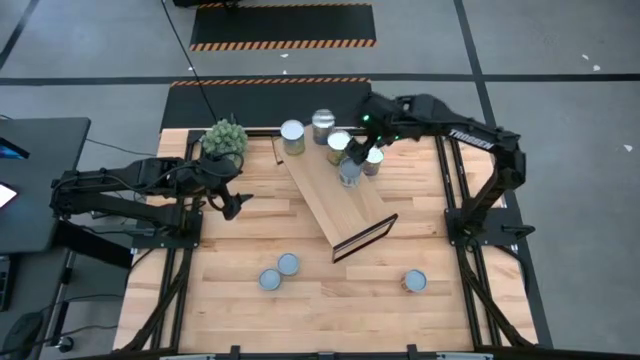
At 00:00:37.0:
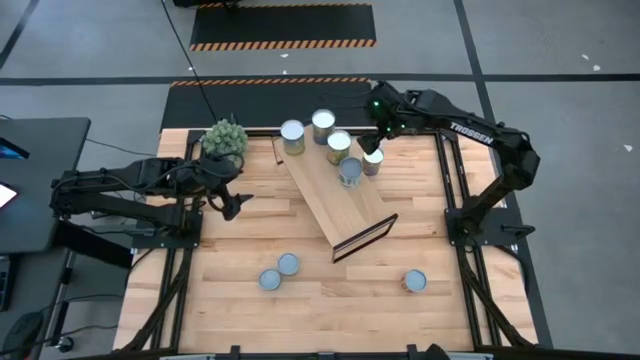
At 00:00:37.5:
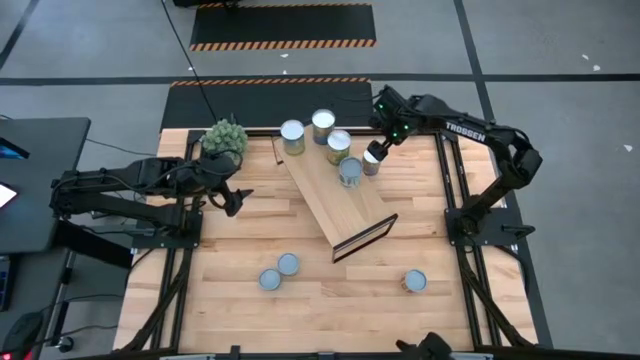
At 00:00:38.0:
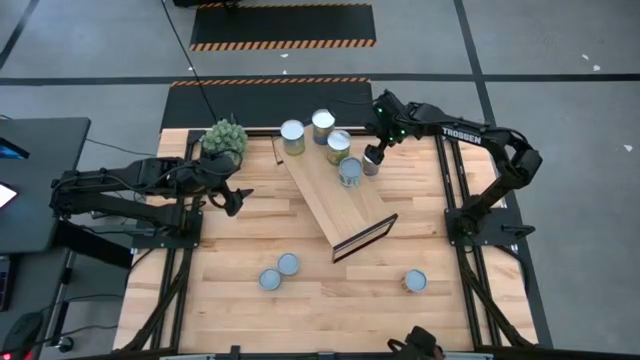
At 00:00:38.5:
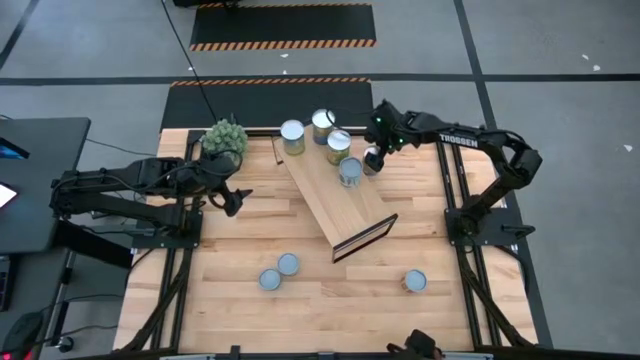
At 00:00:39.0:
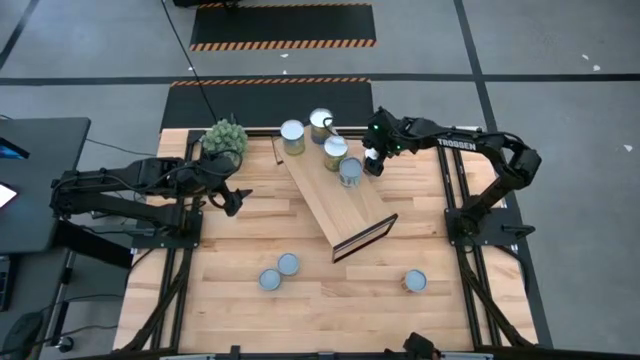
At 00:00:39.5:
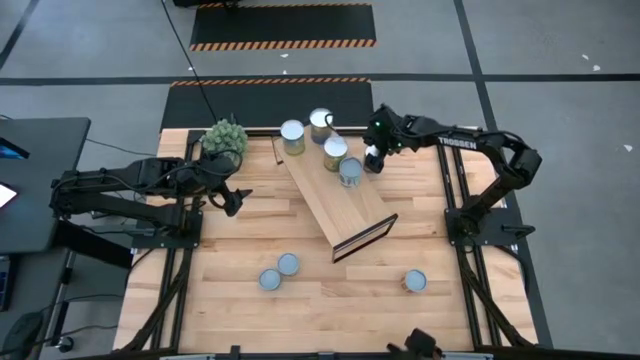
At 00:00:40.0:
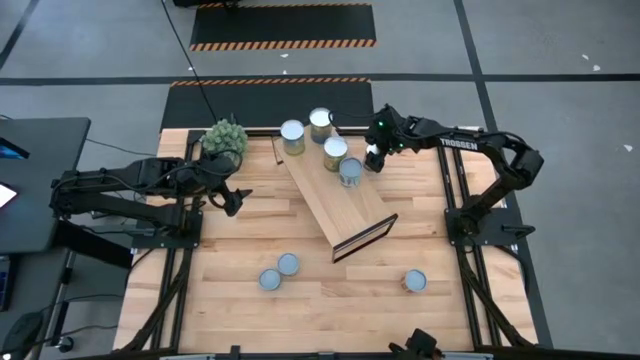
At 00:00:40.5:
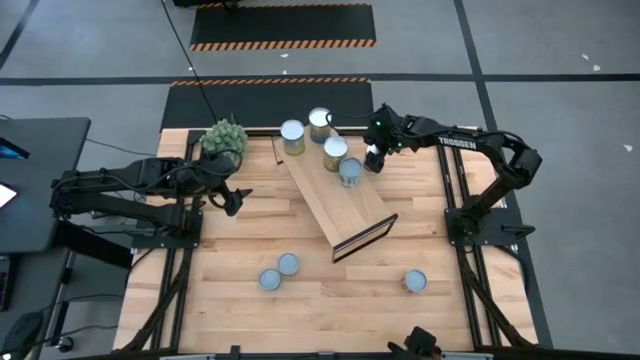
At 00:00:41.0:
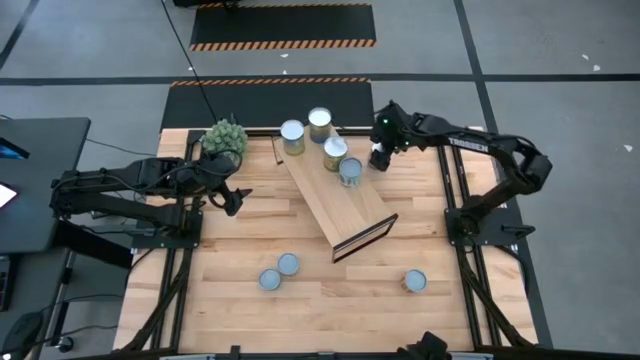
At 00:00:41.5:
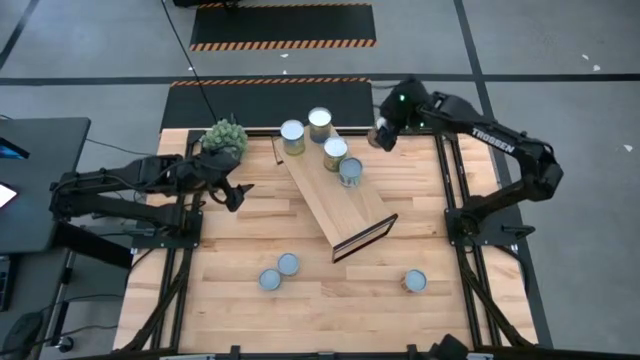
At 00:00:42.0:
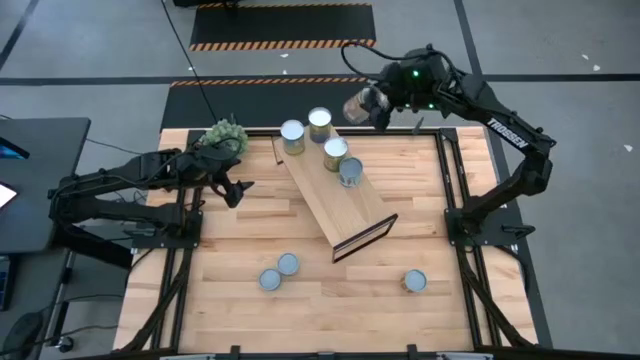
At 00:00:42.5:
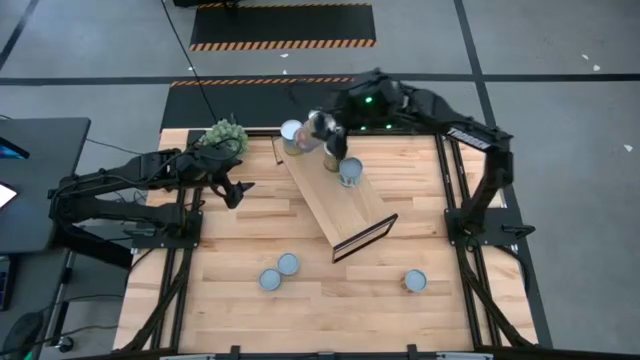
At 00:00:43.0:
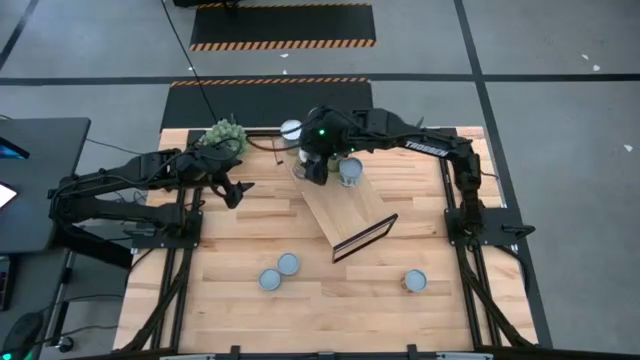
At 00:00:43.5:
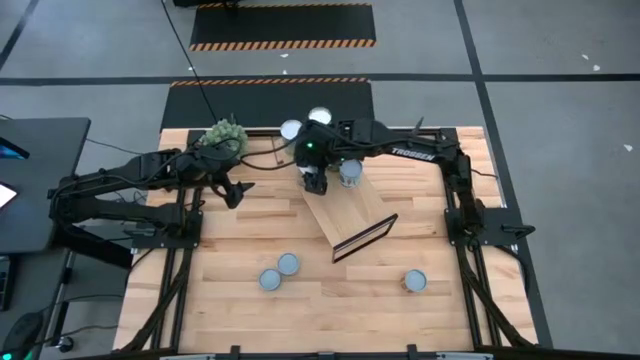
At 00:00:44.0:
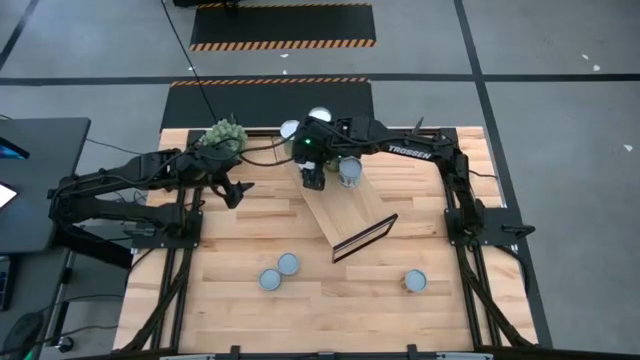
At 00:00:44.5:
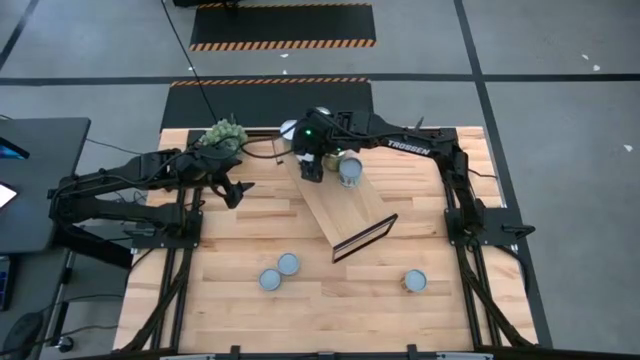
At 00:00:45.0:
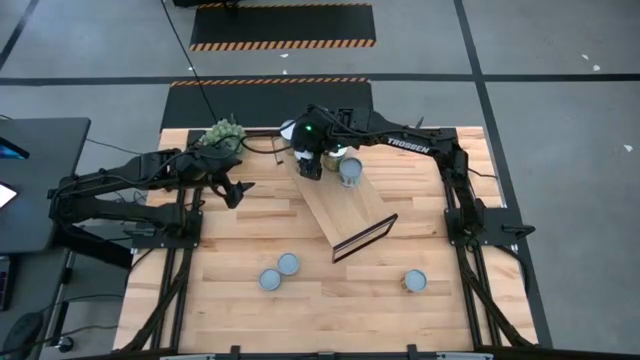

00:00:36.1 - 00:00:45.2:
Task: Pick and place cans onto a shelf
Put the canned peaches on the shelf

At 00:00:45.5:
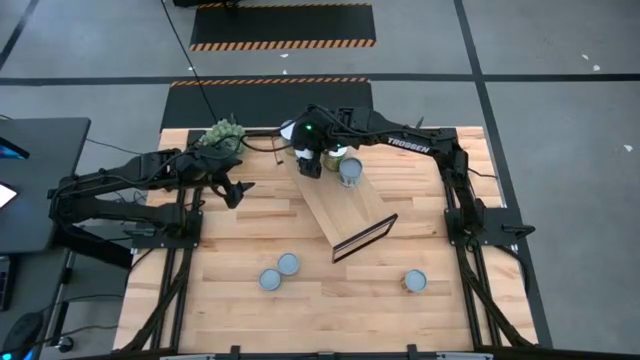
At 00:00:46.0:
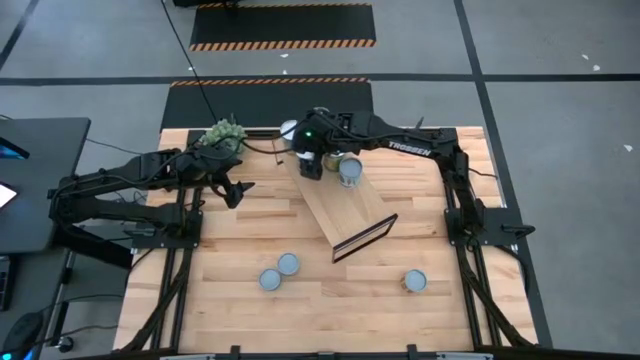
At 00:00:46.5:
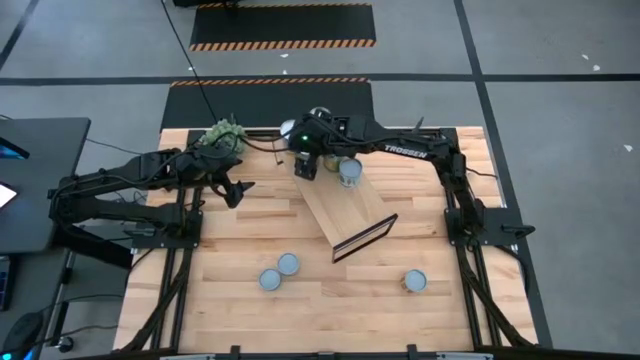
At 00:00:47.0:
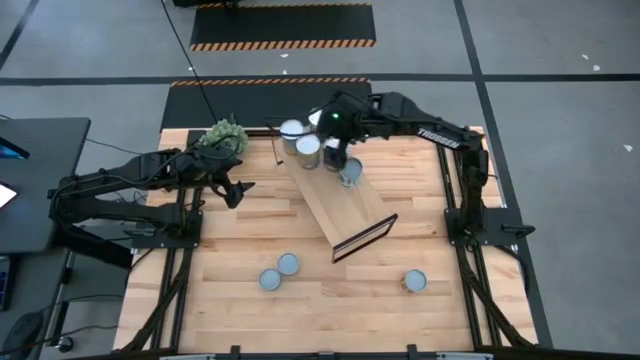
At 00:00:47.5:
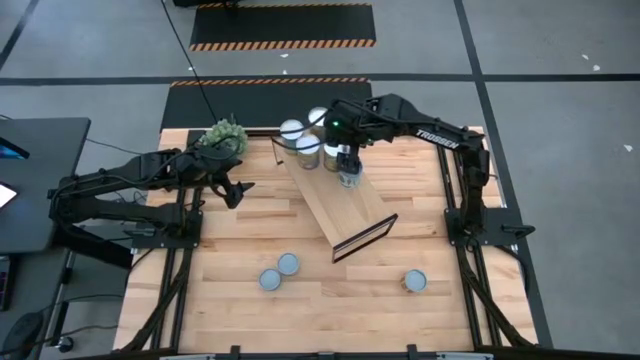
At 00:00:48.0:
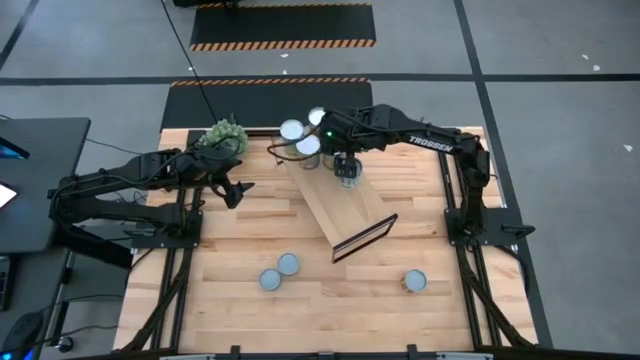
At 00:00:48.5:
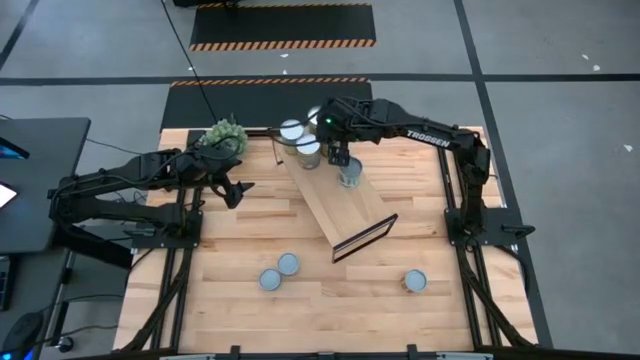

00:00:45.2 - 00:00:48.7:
Adjust the canned oranges on the shelf to align with the other cans

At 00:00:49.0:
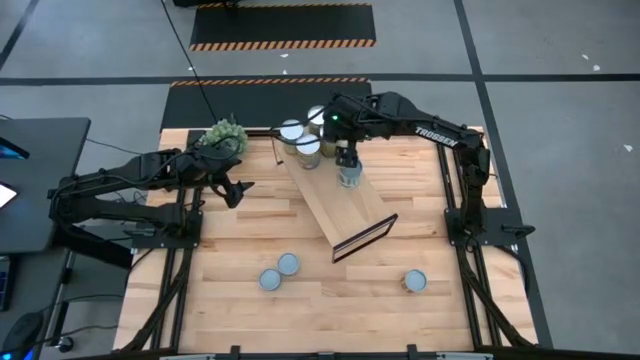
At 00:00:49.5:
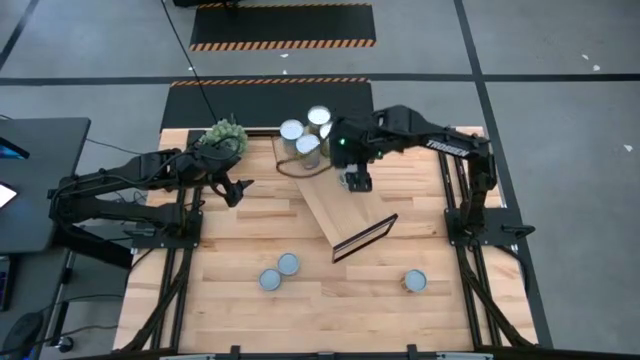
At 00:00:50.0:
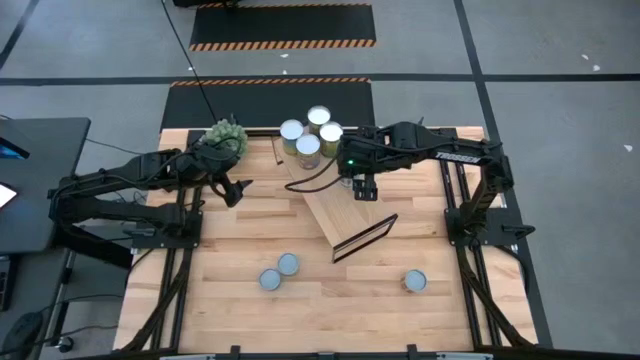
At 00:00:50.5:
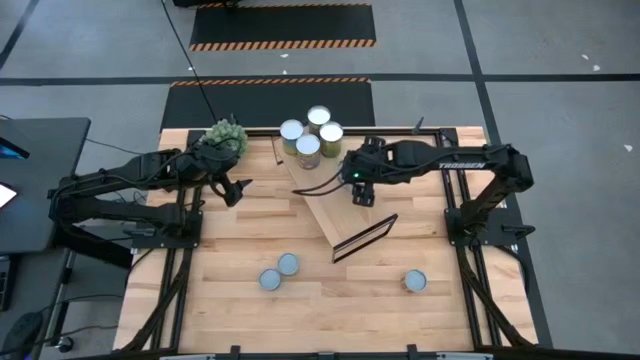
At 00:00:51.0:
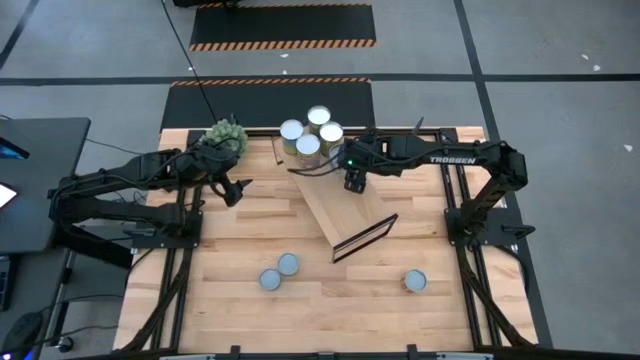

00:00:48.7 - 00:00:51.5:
Adjust the canned mix vegetables on the shelf to align with the other cans

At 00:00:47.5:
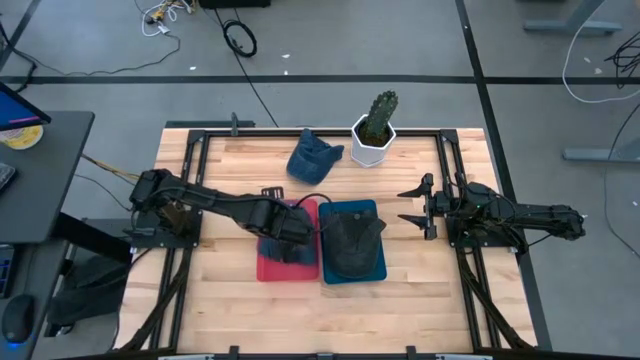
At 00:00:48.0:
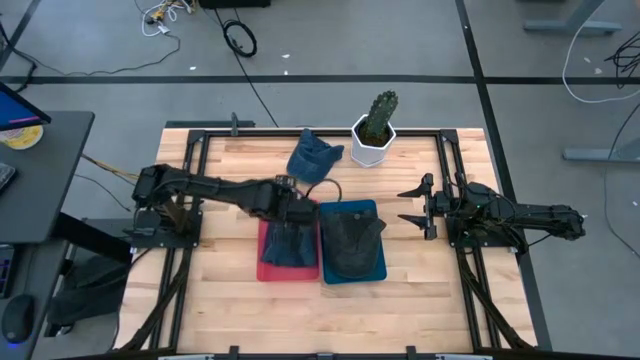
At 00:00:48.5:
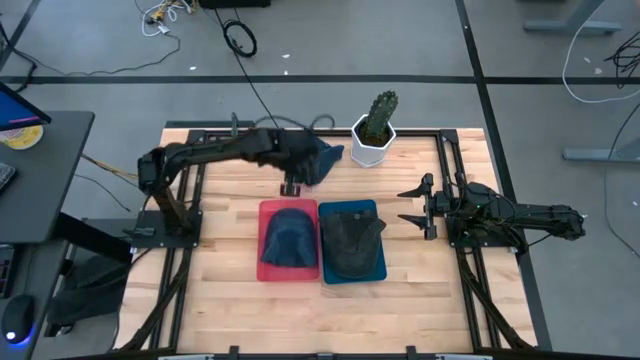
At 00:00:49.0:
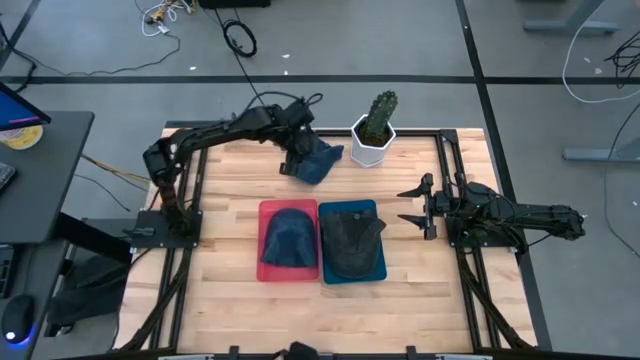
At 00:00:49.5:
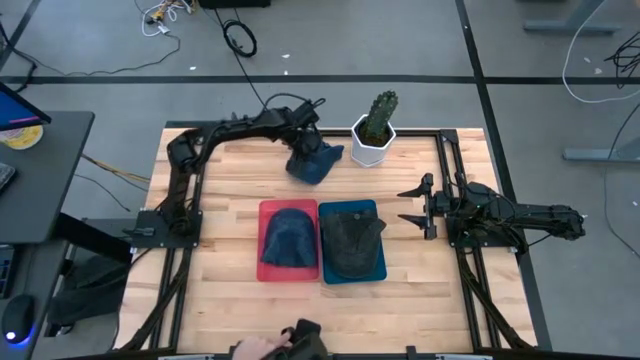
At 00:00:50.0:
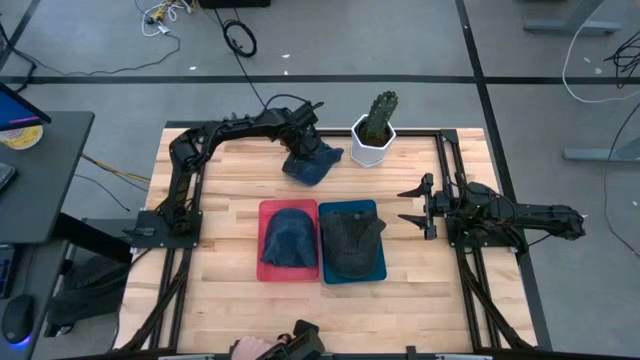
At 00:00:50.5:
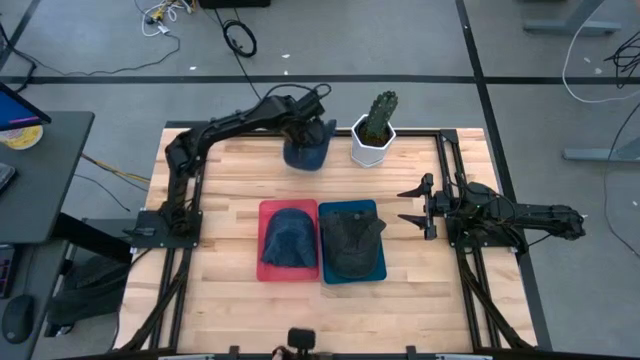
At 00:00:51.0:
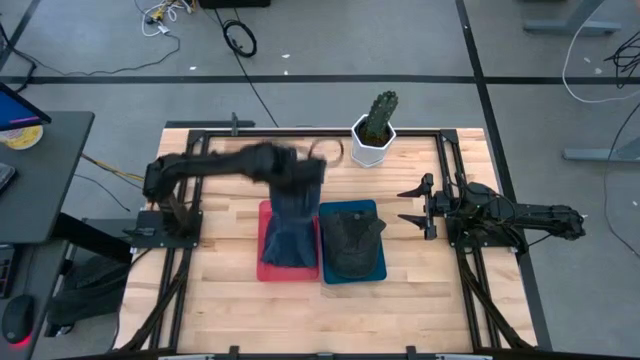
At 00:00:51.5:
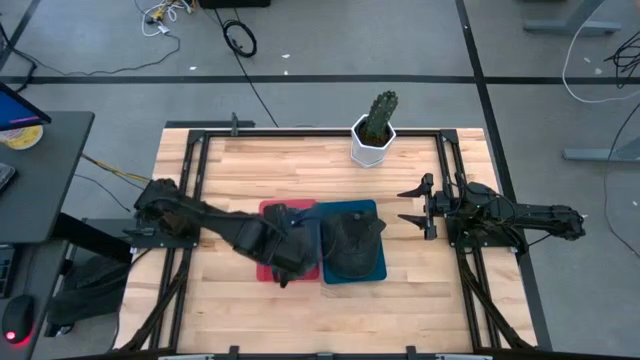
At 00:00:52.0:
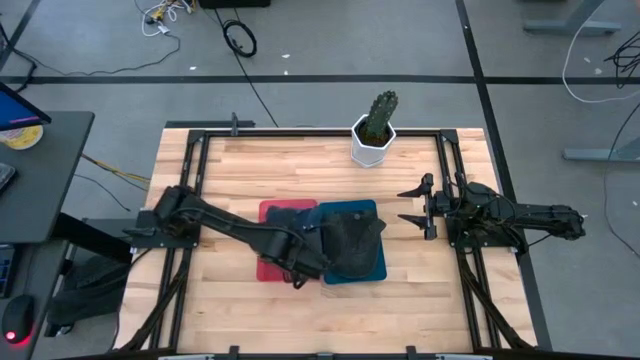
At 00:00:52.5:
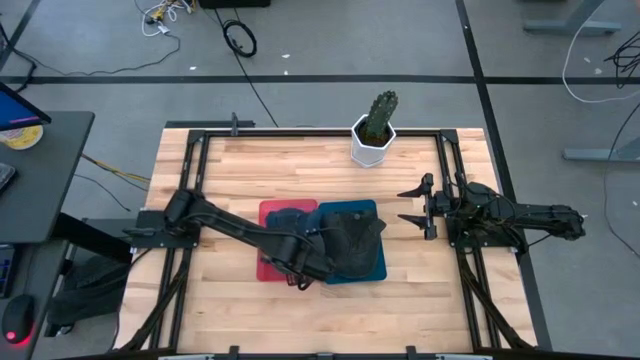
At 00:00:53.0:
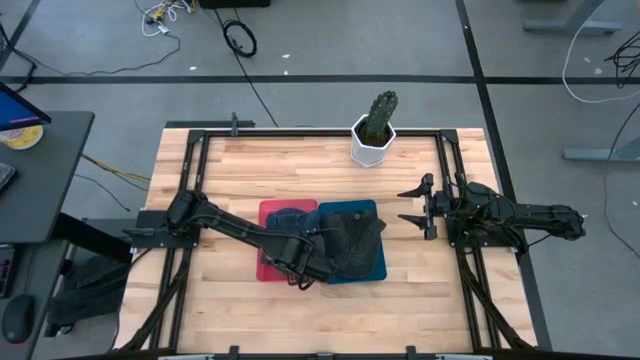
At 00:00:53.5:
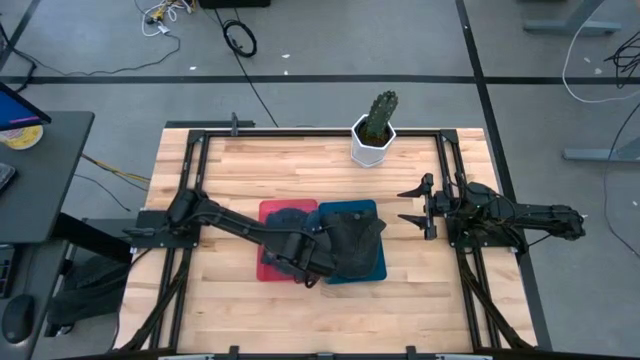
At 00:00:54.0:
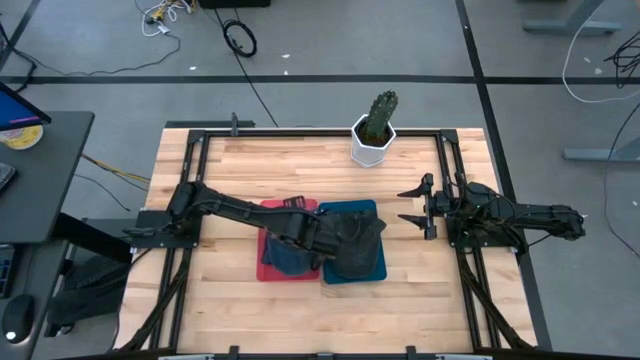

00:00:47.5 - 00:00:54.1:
Task: Pick & Place hat
Put the dark blue cap into the red bin
